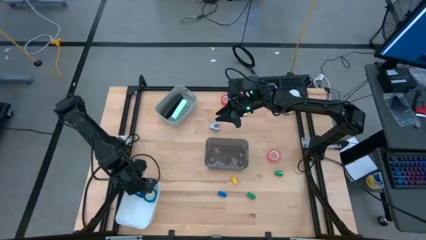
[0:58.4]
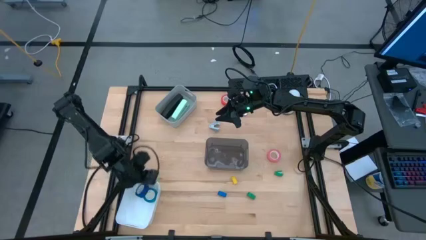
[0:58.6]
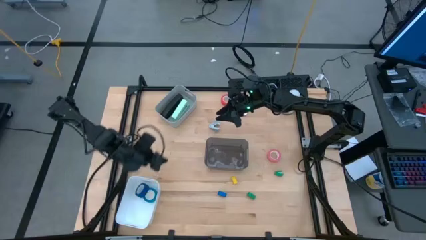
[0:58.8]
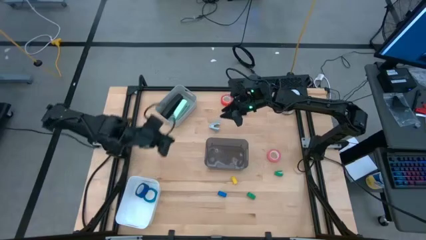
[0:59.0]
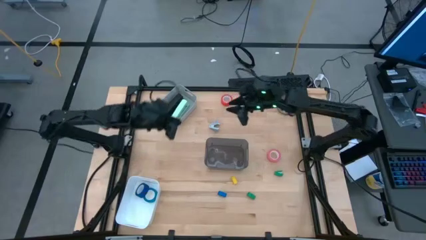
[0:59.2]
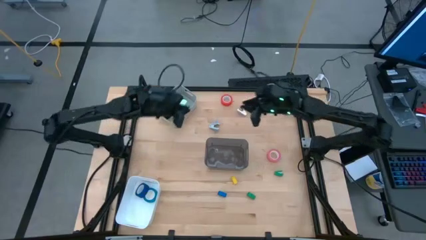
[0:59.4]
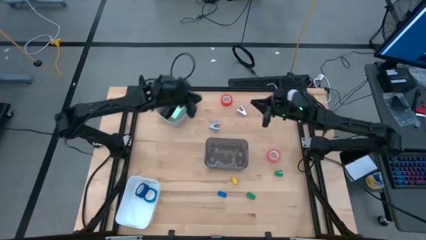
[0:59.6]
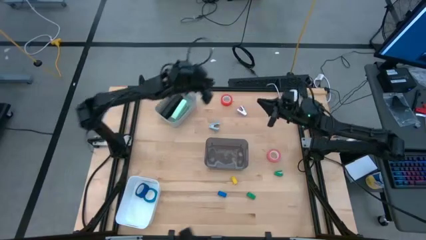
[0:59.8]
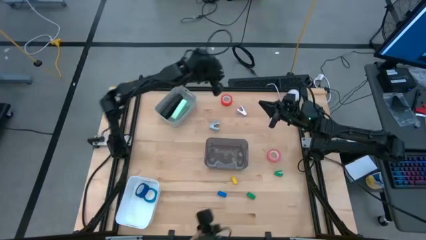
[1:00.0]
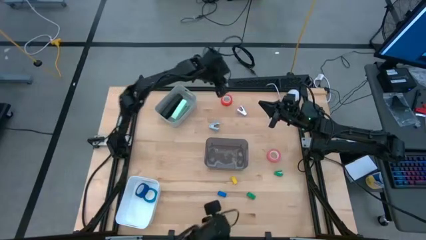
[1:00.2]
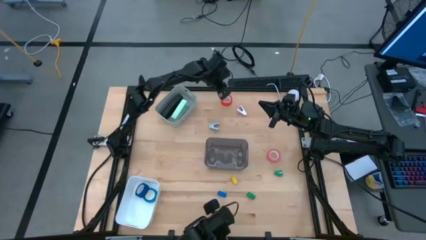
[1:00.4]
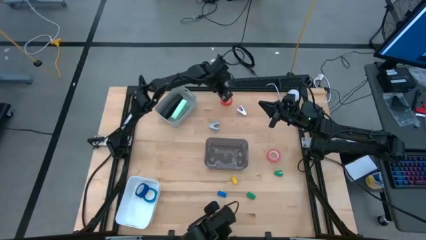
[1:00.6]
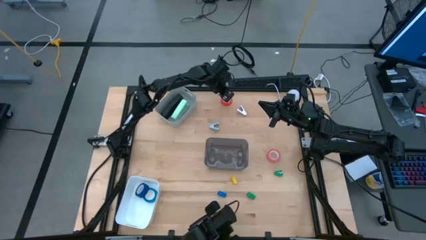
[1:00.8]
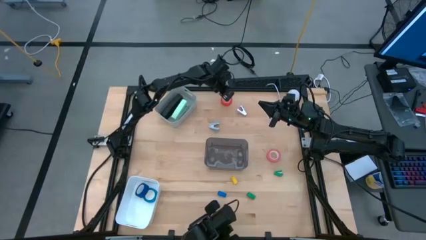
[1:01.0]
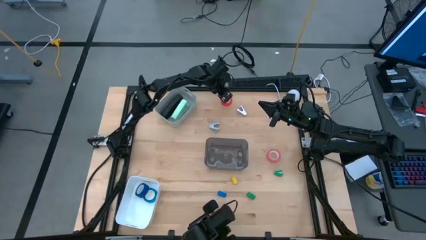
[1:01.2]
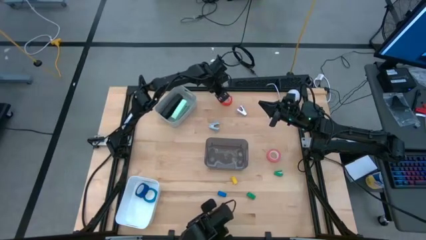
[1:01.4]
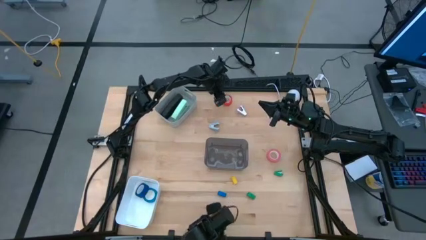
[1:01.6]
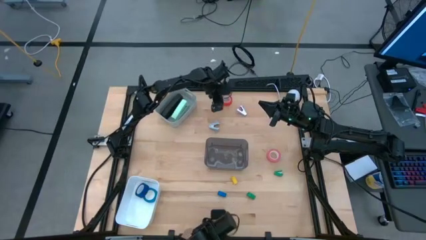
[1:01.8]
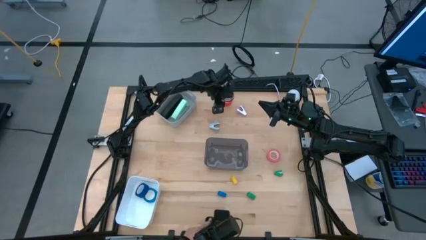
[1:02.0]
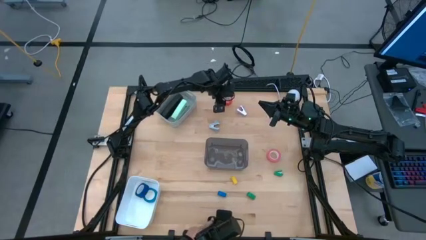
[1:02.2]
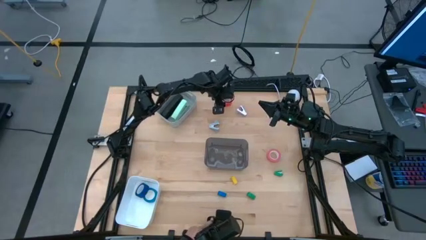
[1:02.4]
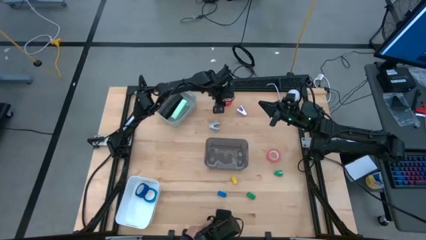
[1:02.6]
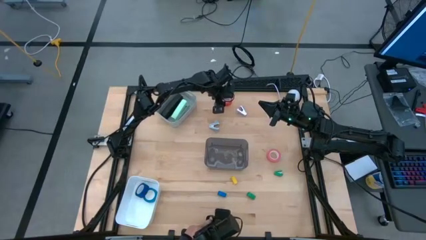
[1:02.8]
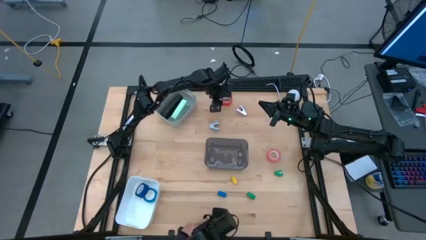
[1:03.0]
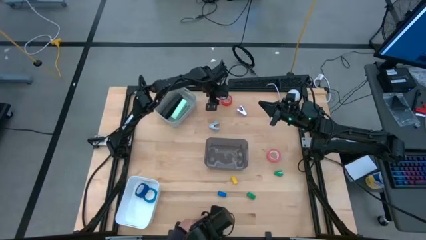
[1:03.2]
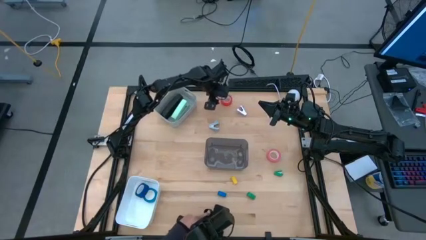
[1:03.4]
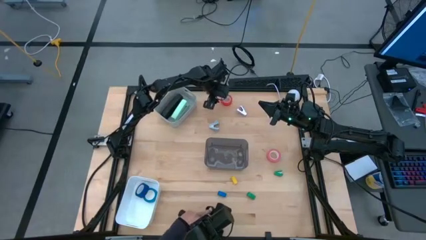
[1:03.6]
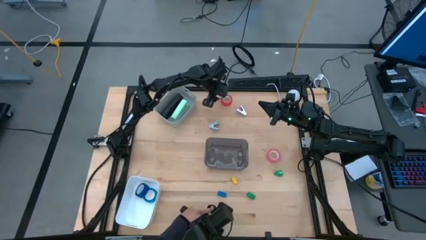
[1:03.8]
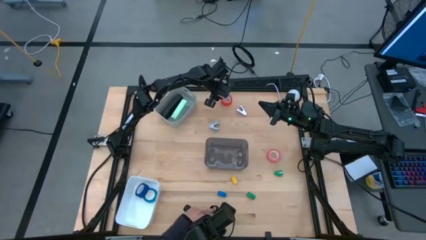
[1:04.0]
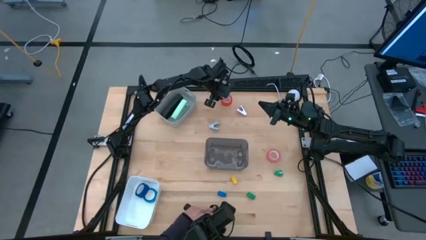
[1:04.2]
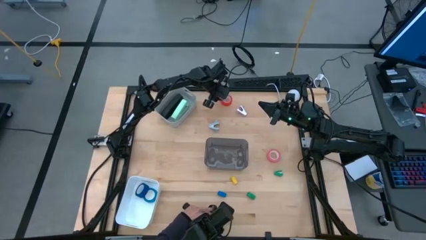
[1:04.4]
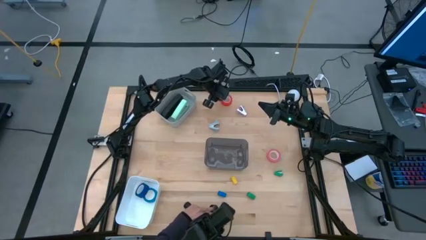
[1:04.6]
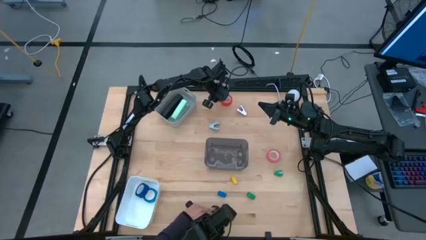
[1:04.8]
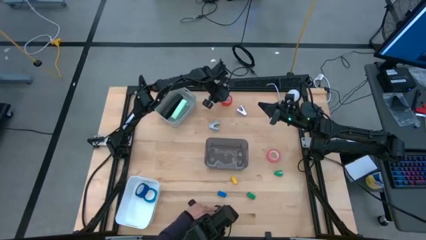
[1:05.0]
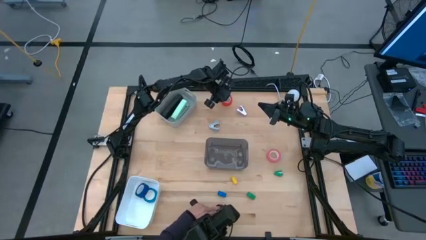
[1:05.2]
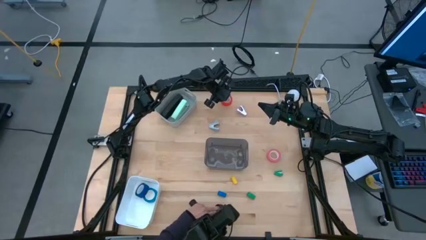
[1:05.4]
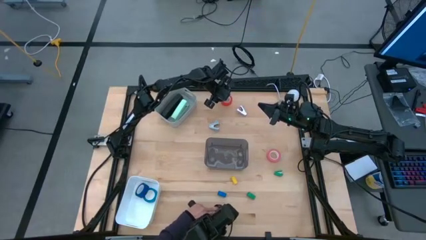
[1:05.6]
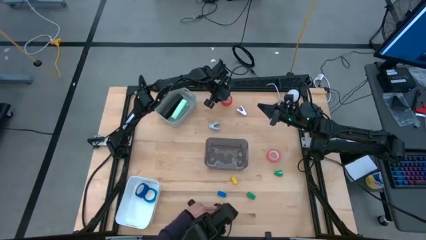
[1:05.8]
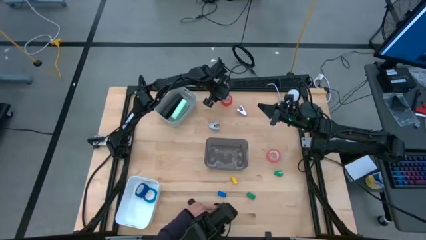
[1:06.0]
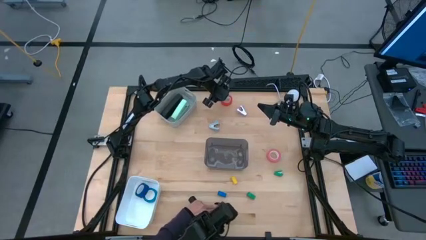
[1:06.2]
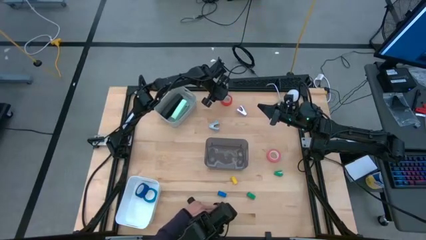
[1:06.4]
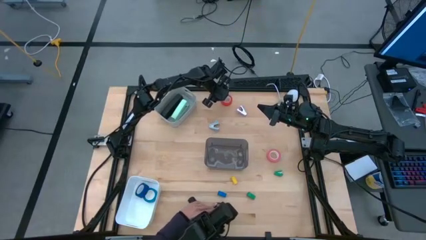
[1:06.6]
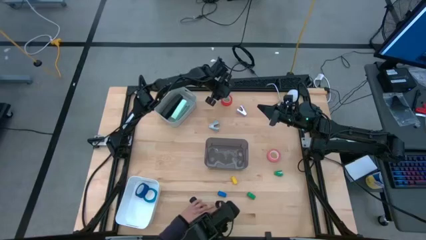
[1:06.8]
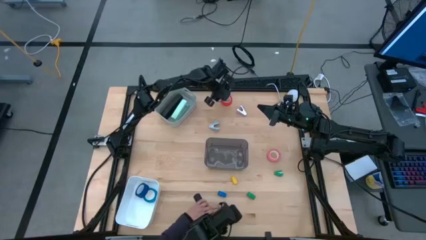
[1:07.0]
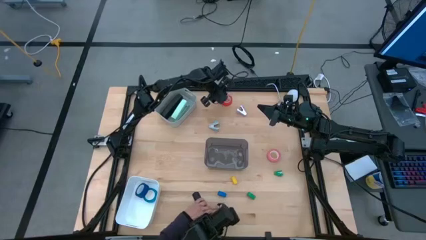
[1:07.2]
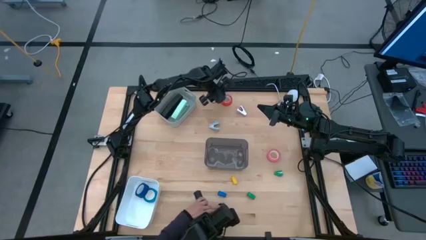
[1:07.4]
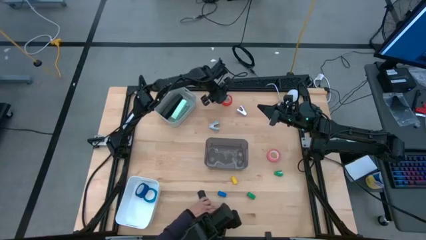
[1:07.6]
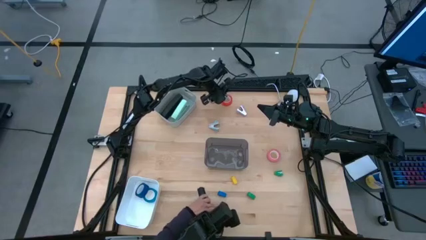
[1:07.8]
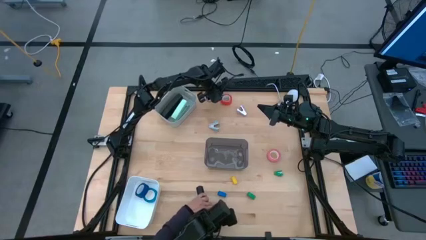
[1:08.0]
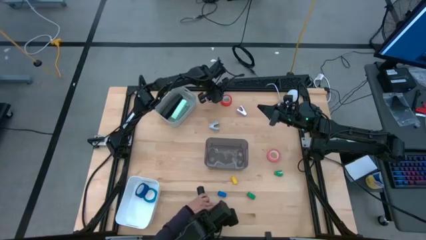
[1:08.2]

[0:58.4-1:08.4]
Task: Pick and place Stapler, Stapler remover, tape
Put the orange tape into the white bin

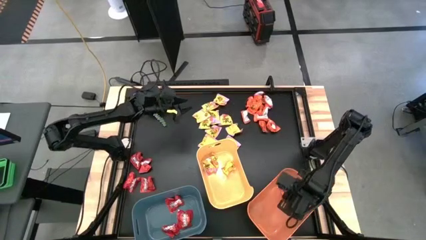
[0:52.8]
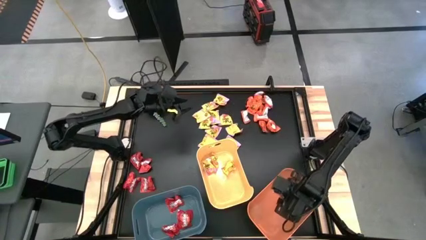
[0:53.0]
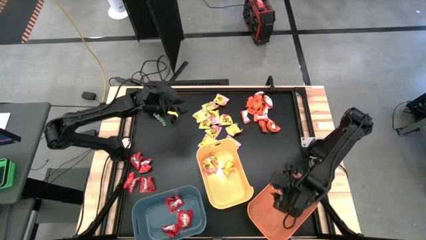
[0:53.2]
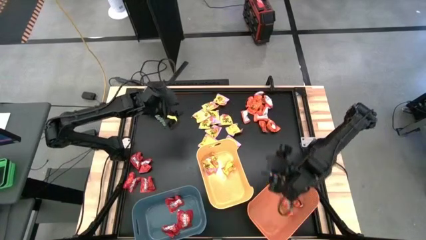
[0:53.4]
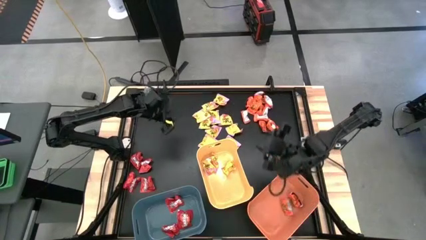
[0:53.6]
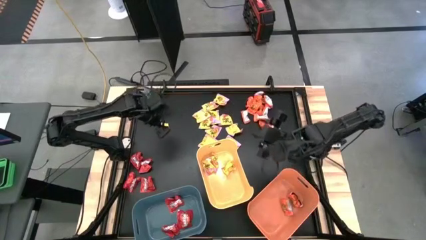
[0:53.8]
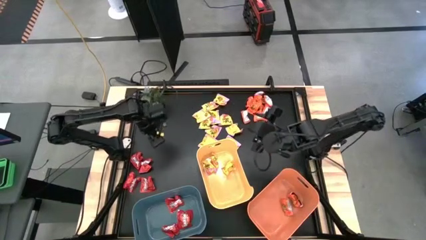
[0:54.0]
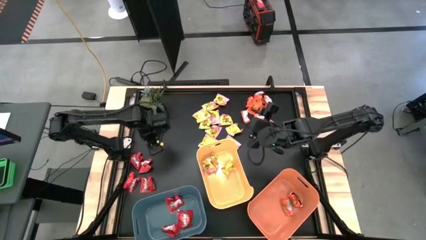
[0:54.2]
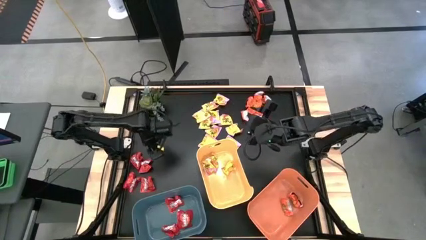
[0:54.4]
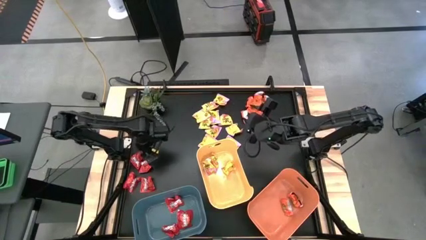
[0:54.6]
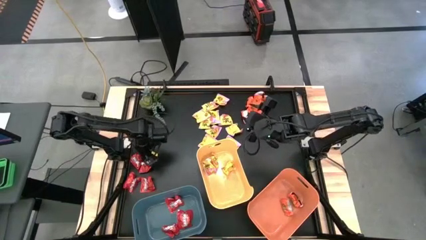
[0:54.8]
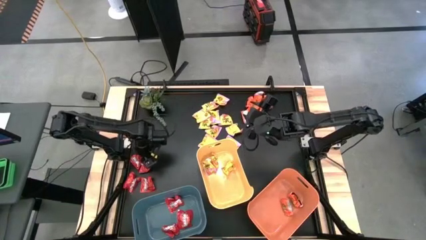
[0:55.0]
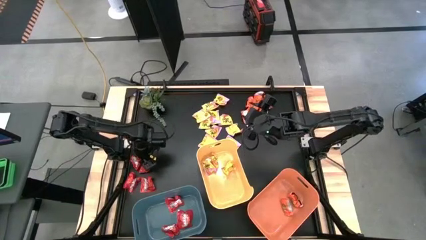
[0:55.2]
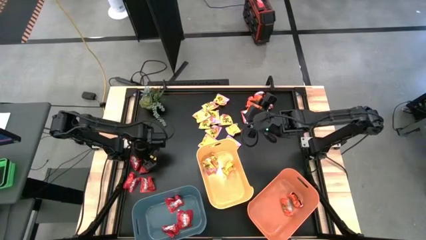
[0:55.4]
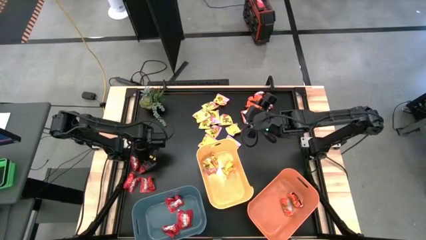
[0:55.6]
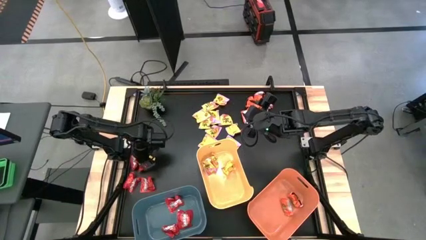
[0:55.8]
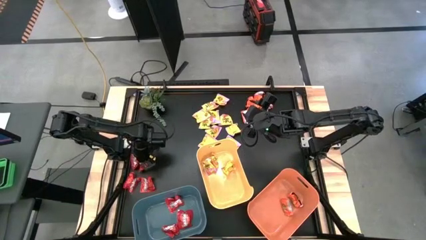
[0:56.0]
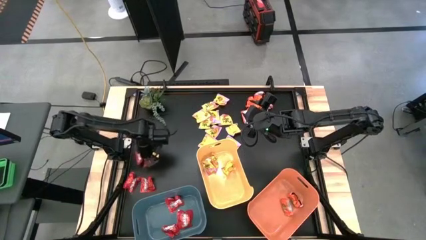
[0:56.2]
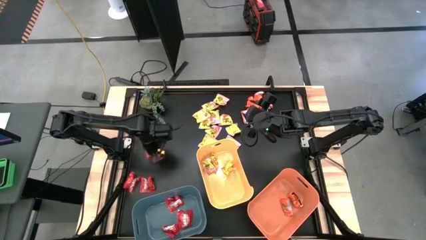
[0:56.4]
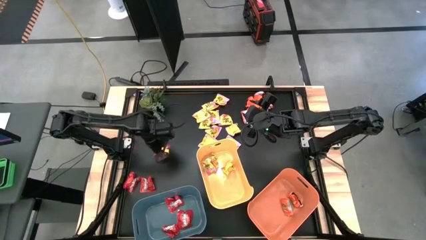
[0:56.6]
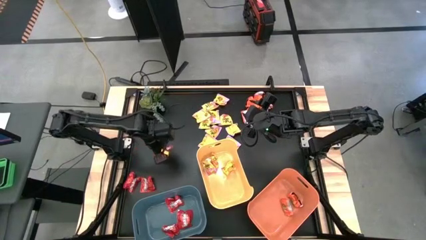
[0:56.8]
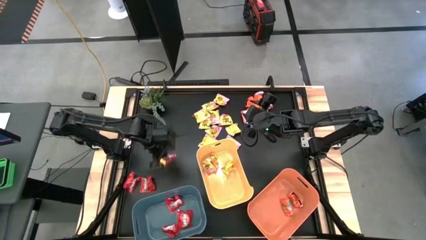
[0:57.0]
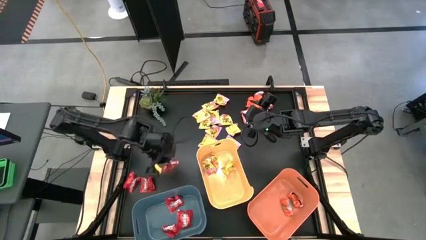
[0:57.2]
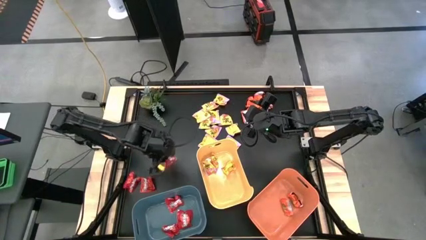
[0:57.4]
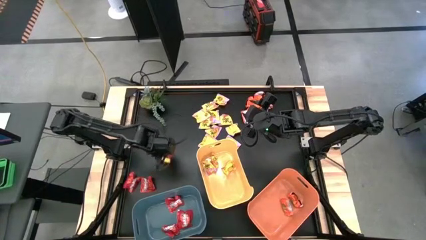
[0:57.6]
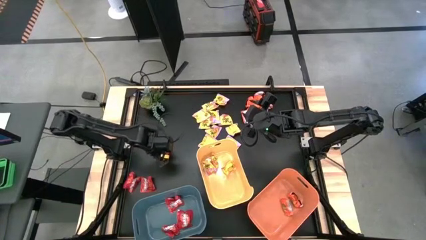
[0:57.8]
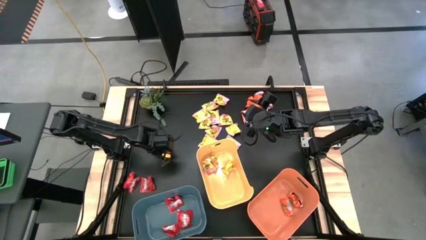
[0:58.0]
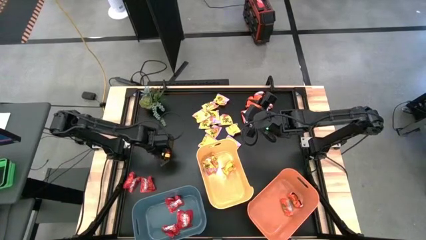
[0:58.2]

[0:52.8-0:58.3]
Task: Sort candy
Put the red candy into the blue bin

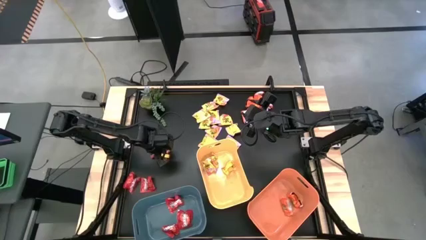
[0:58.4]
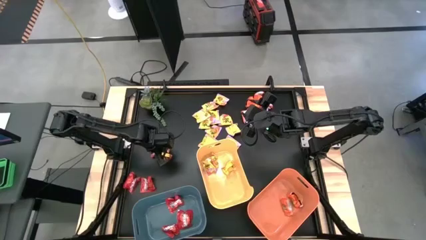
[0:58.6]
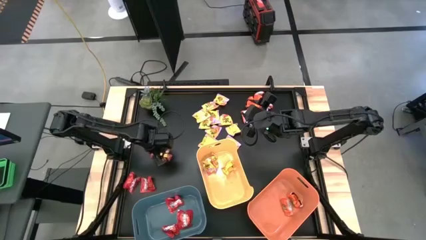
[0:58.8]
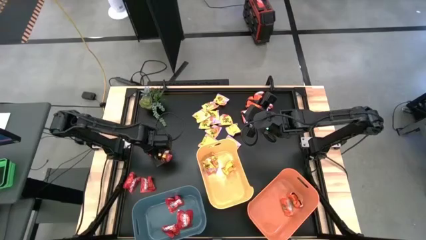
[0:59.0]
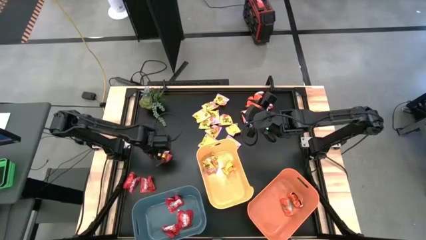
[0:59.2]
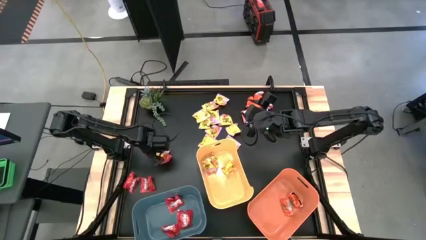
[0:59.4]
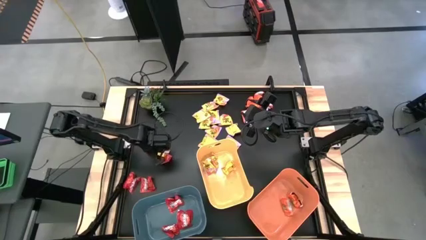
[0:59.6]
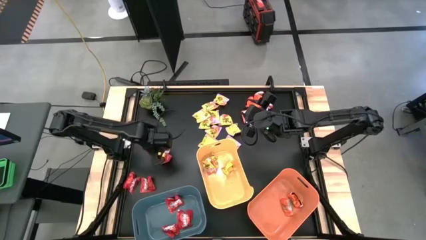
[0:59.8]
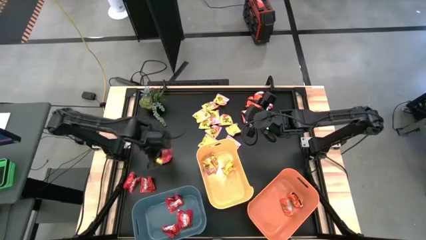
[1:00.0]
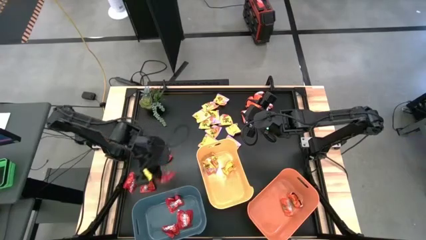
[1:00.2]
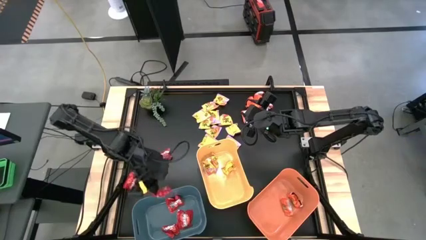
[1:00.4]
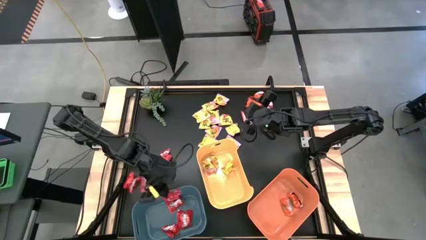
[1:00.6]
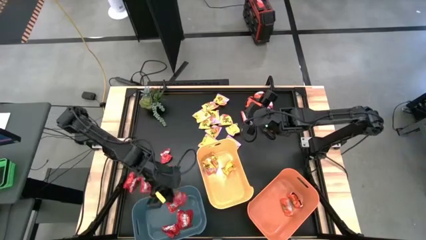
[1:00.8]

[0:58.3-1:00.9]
Put the red candy into the blue bin
